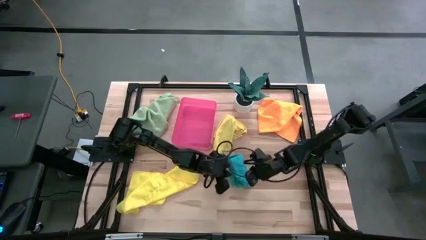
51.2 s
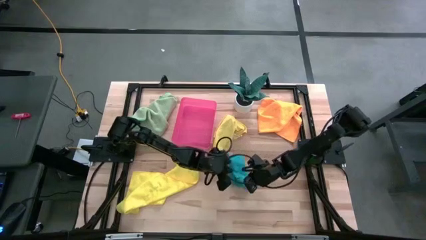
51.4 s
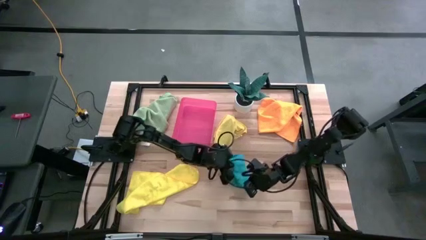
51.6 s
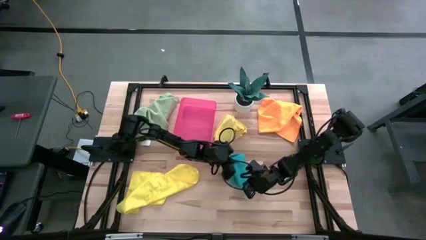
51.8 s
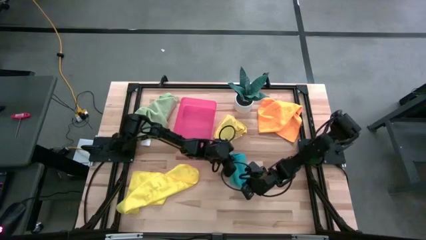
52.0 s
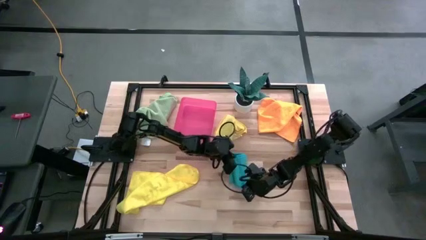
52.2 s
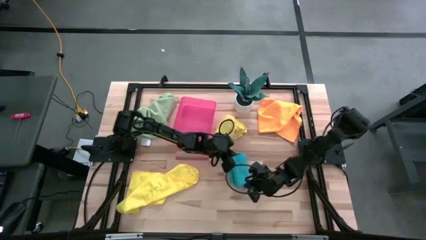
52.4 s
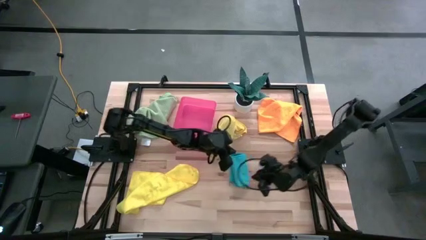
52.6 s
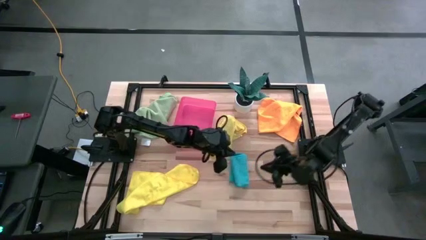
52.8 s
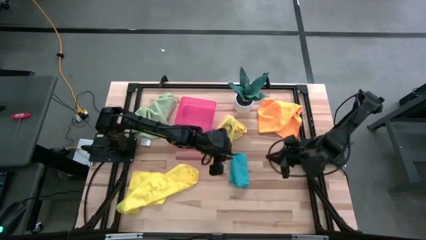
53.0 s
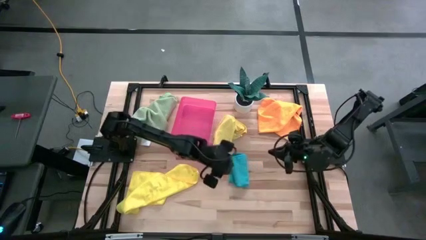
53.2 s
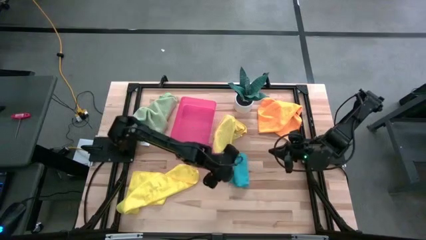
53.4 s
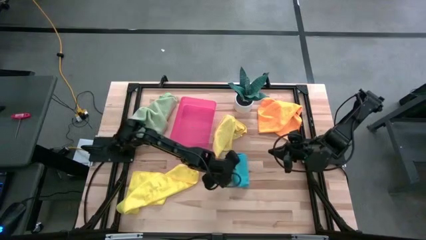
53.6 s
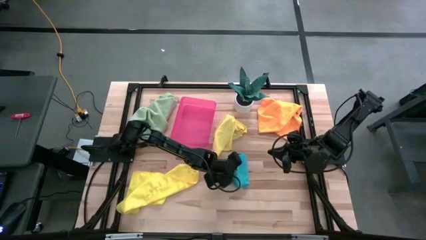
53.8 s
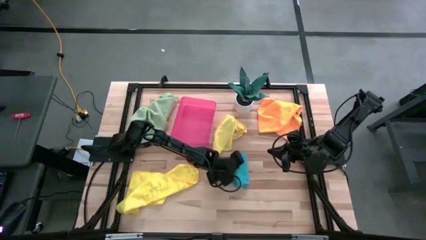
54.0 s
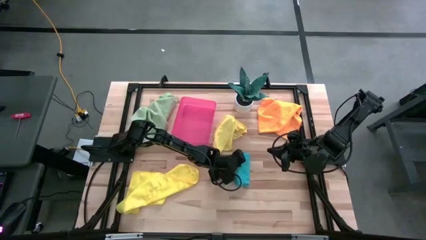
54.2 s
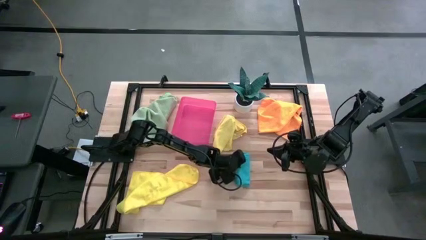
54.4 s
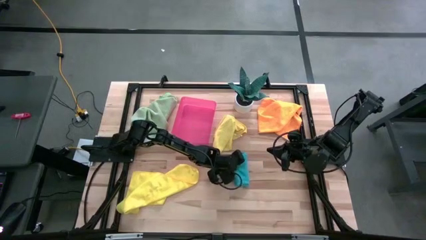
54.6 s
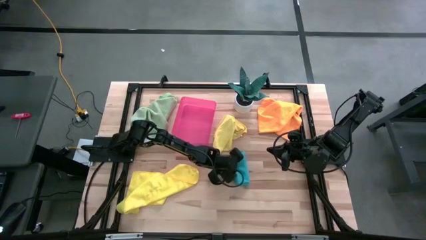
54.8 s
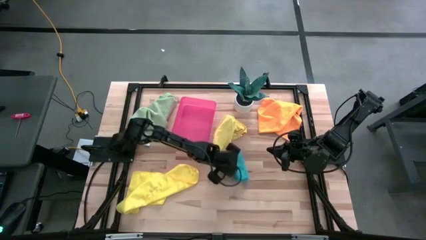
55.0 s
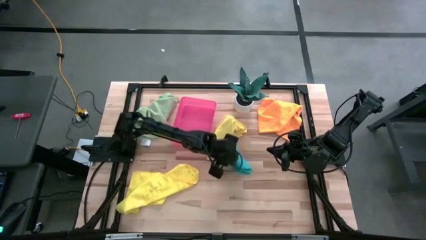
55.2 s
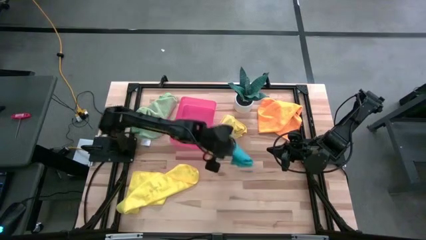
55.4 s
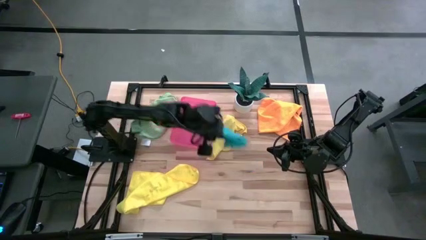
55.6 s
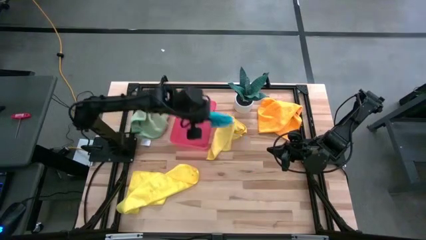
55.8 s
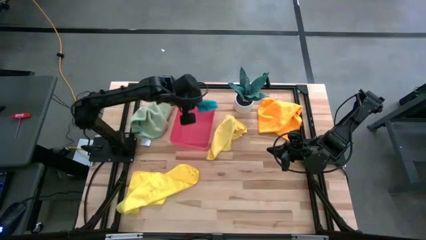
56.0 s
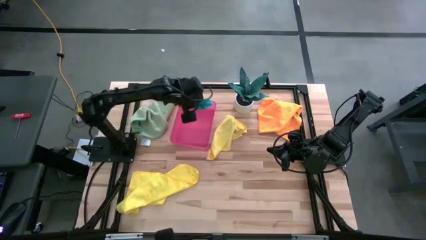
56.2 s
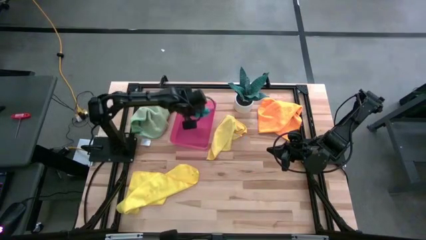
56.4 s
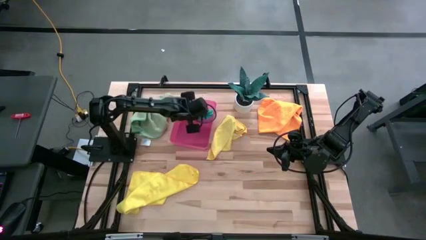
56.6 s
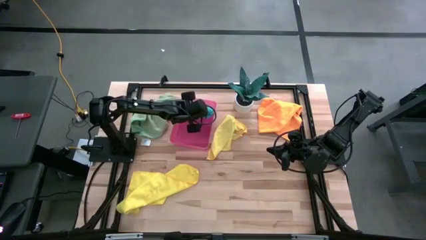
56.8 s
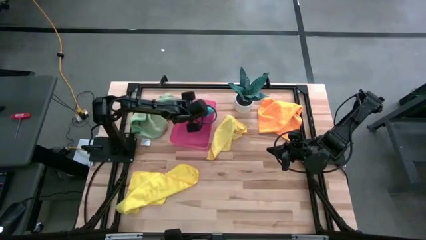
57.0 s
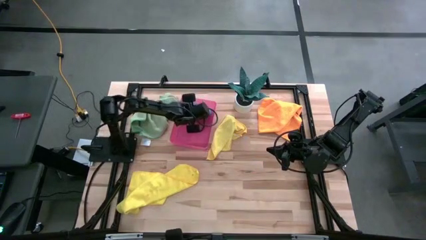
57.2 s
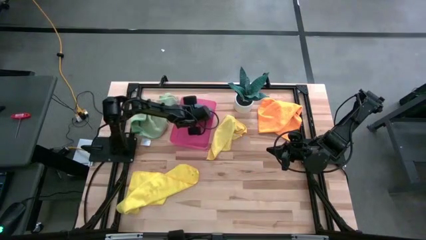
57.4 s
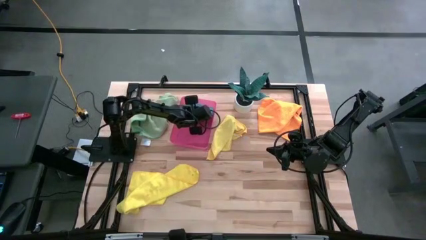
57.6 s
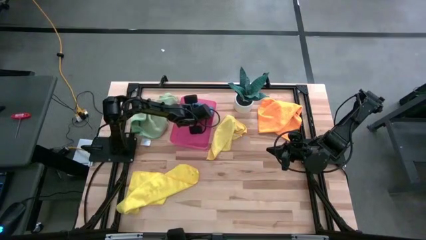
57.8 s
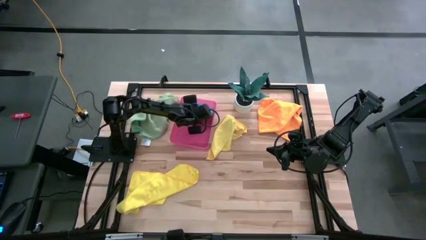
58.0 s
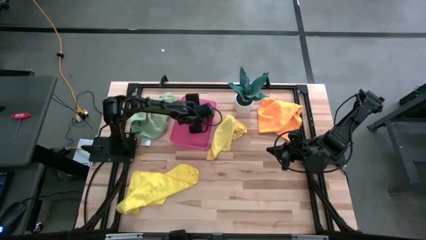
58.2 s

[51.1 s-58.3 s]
Task: Fold microfiber towels
Put the blue microfiber cloth into the pink bin

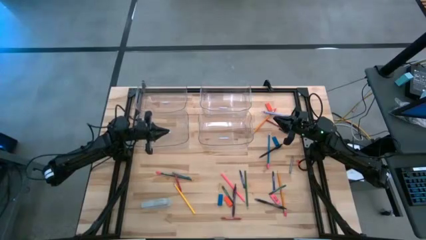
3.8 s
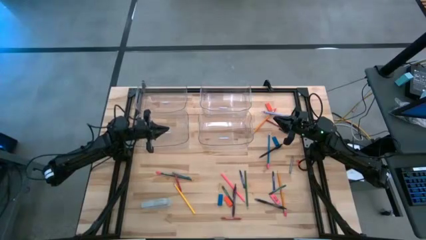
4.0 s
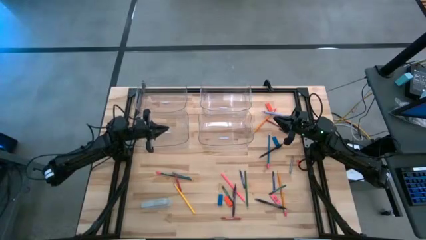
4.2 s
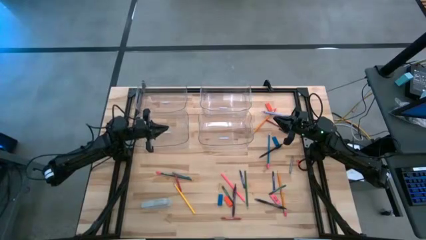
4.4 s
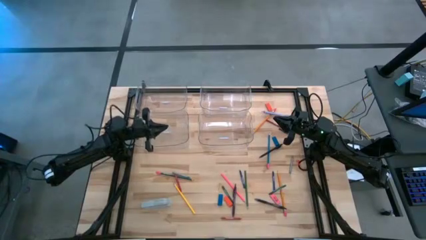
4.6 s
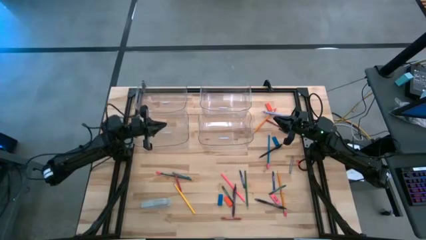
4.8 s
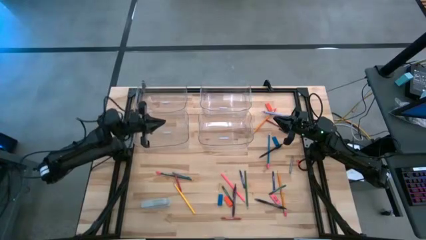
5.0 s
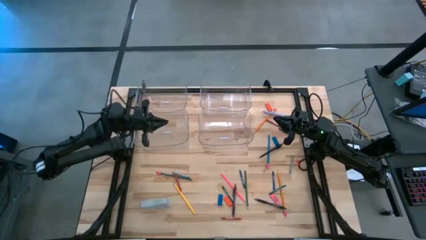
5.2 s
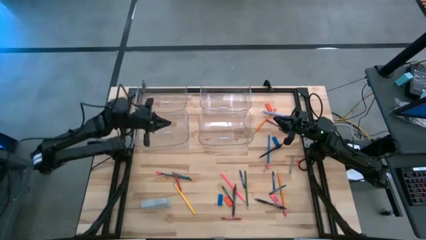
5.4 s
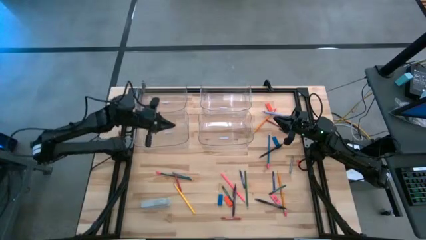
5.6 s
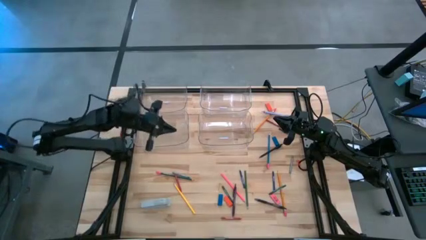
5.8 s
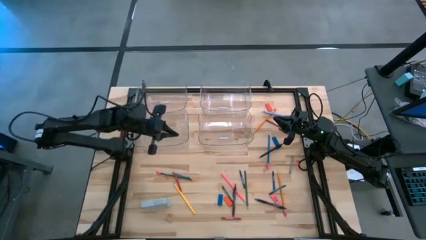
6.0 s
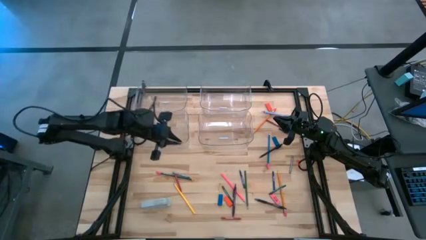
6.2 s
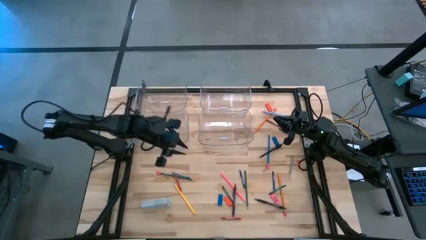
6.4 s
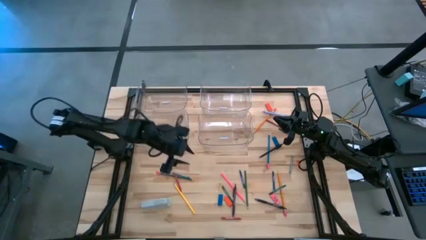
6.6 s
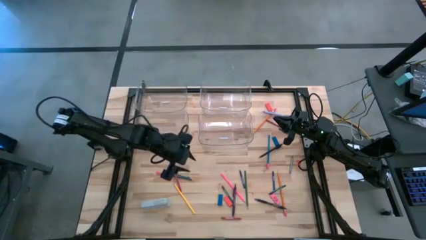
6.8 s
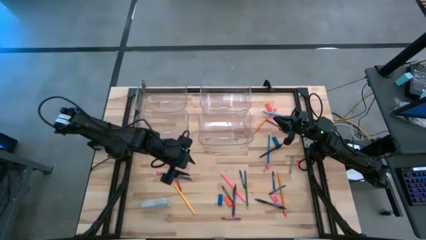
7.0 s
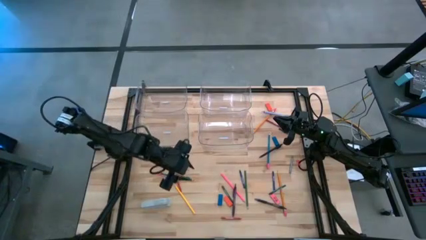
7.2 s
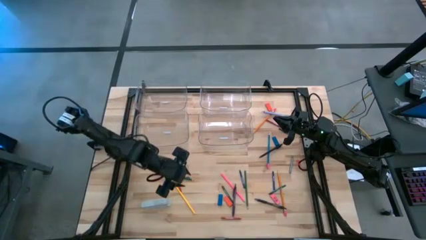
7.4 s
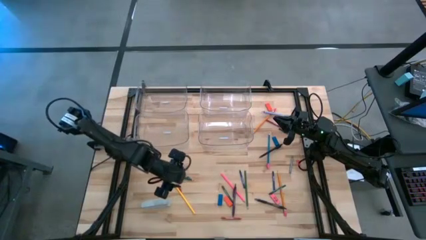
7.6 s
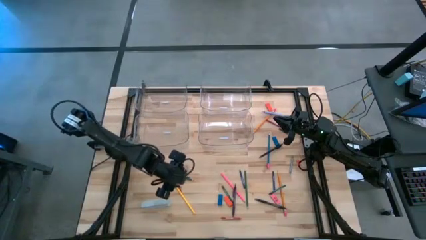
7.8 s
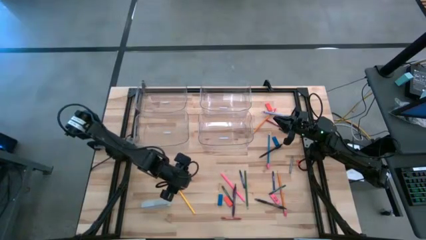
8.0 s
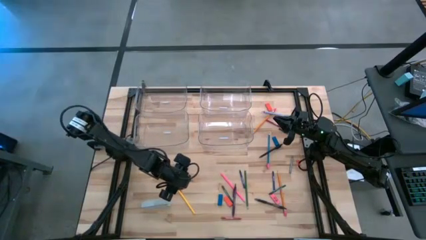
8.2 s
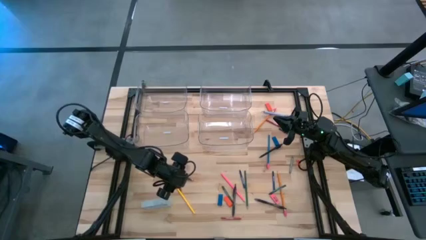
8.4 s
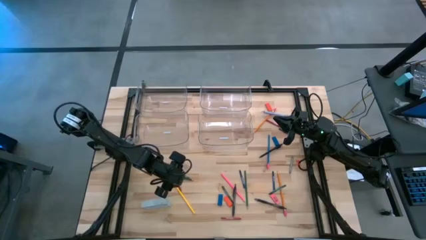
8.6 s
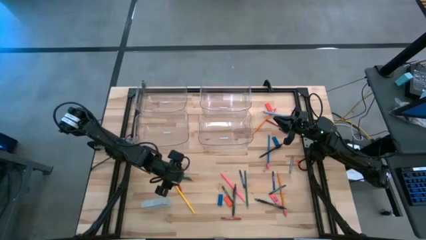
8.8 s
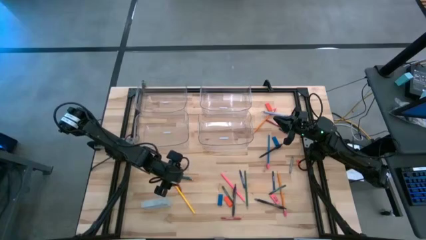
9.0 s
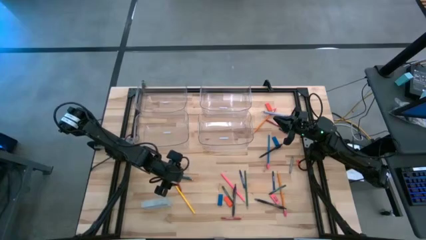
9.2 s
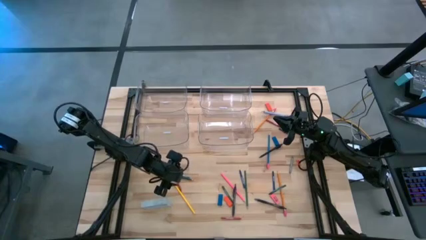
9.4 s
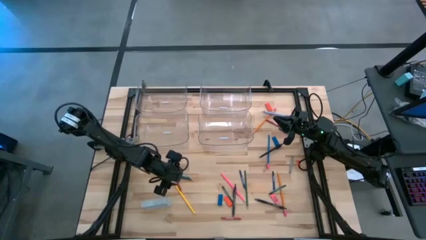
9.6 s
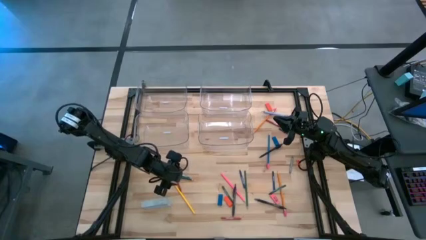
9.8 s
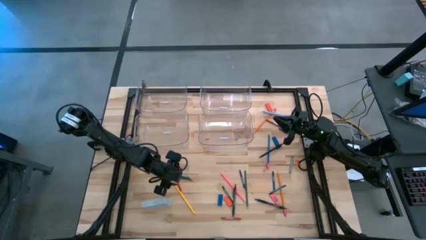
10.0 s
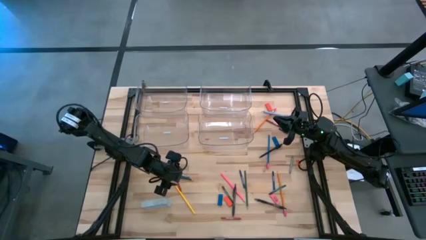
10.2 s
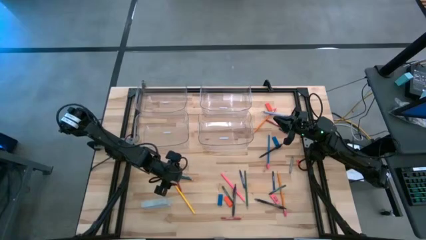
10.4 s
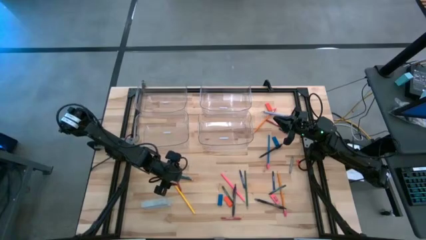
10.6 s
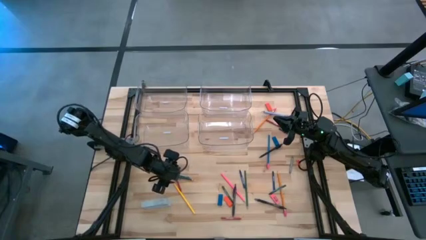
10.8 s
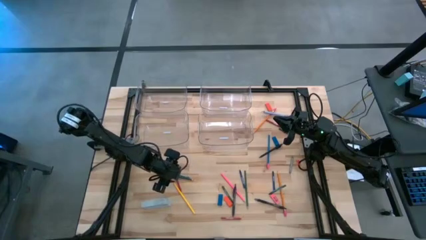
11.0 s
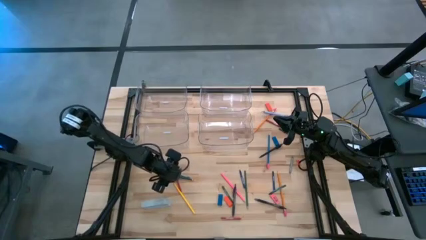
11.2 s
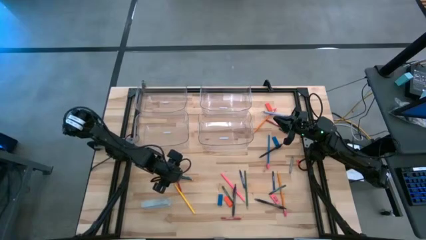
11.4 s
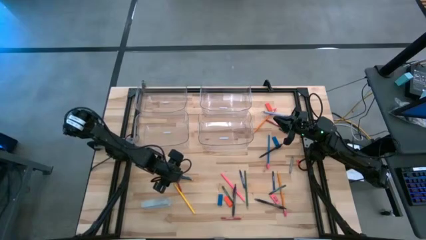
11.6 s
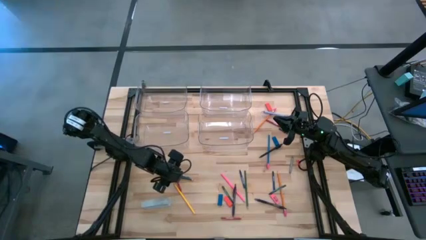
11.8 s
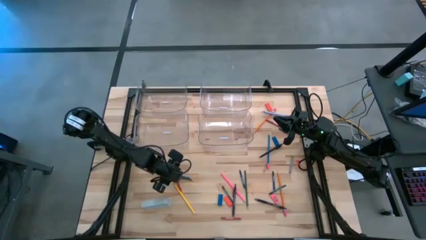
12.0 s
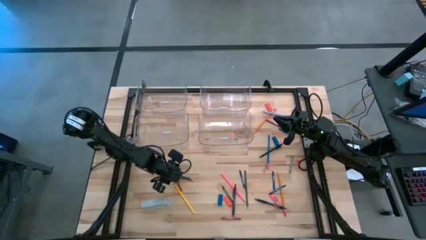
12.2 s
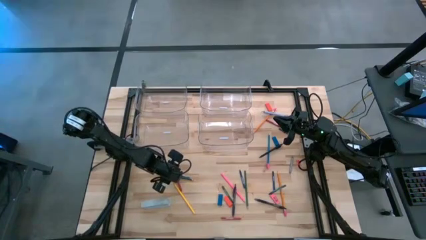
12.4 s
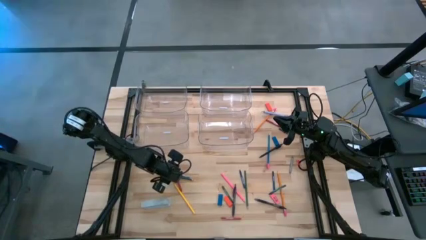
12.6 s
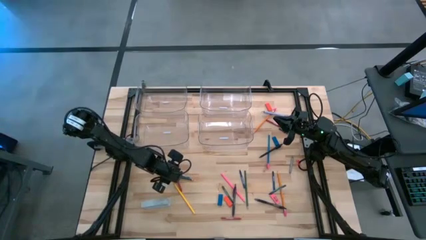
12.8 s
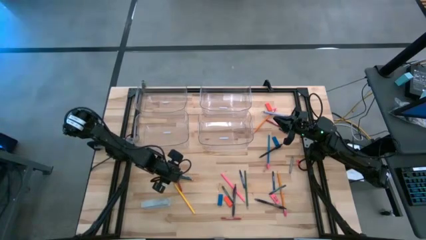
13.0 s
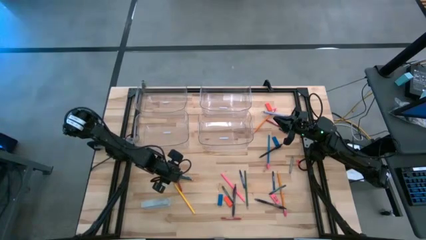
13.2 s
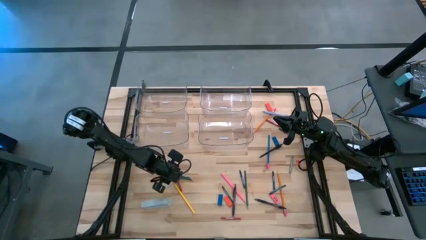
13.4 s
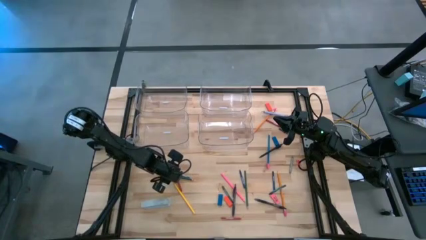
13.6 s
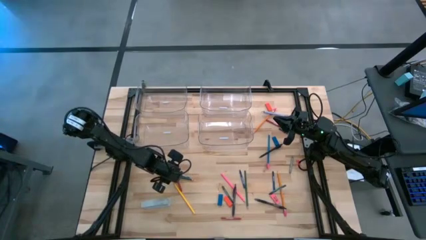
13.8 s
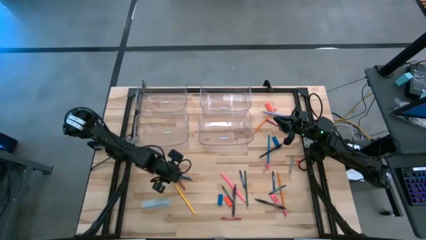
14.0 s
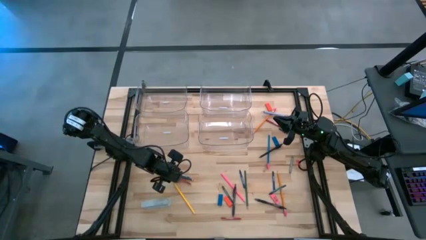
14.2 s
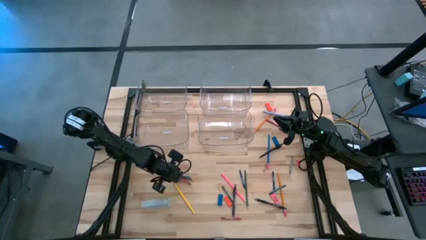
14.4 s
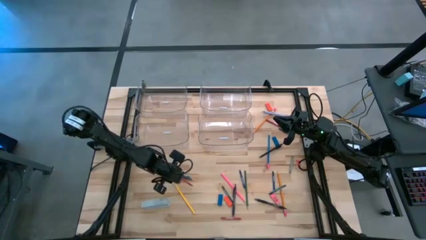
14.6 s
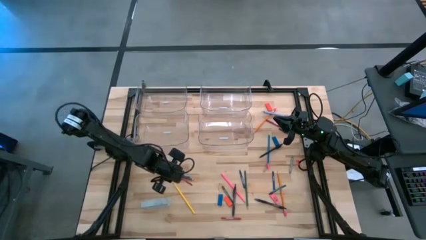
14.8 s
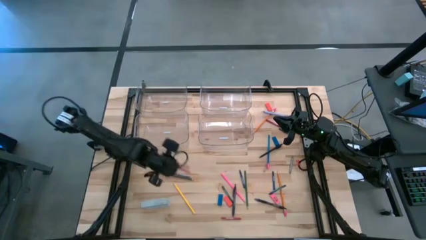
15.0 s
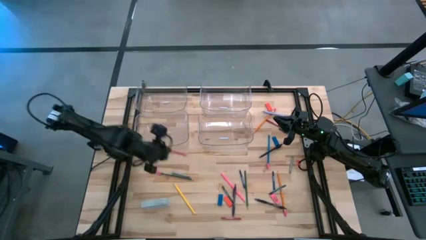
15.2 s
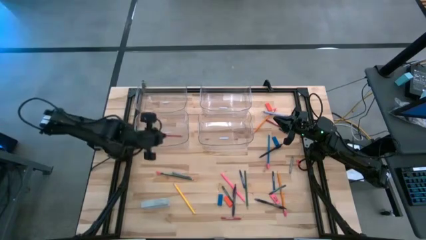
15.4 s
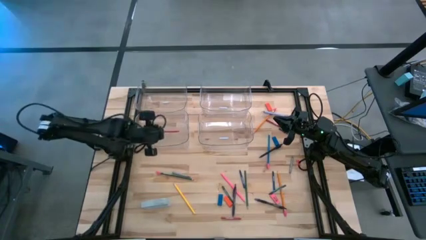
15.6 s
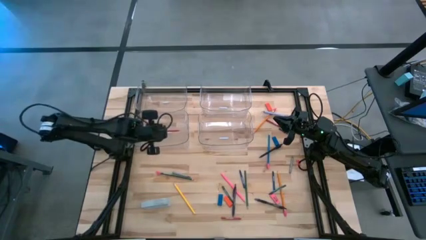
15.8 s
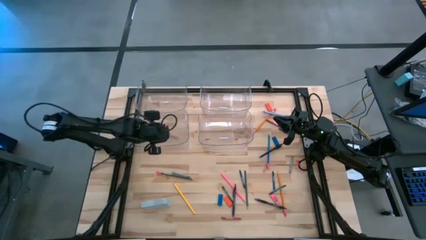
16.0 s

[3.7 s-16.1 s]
Task: Sort crayons/erasers/pens/pencils in bins
Put the middle left red crayon into the bottom left transparent bin
